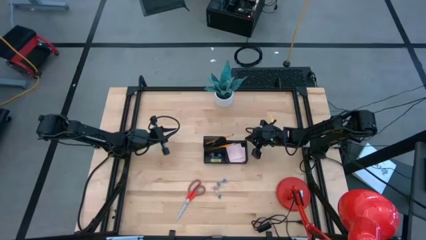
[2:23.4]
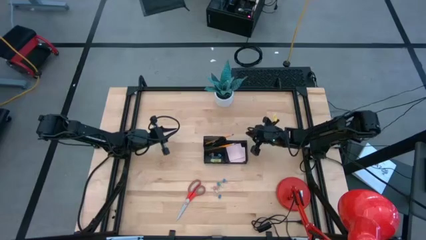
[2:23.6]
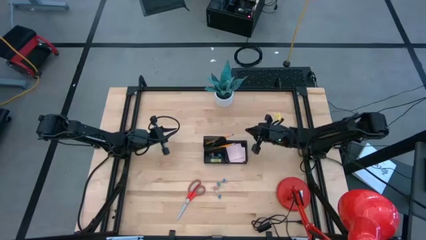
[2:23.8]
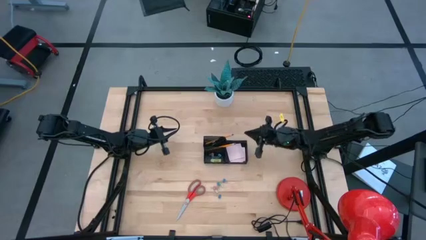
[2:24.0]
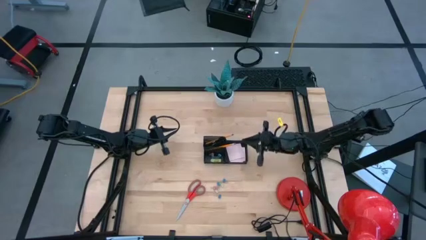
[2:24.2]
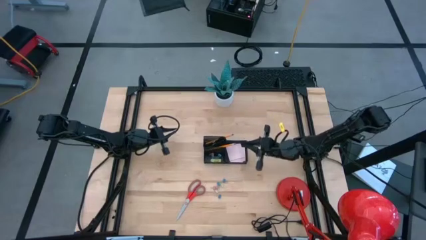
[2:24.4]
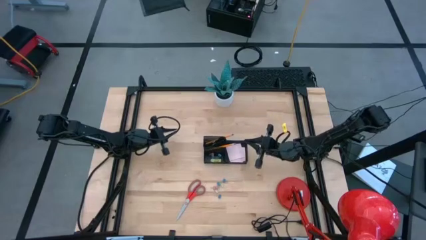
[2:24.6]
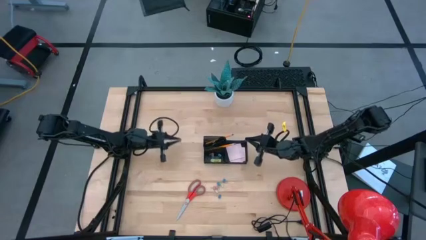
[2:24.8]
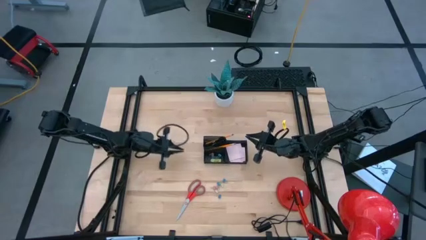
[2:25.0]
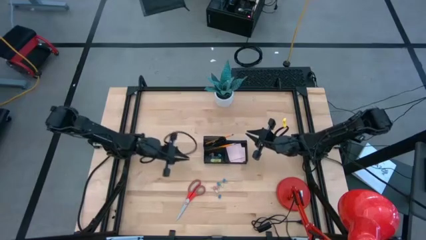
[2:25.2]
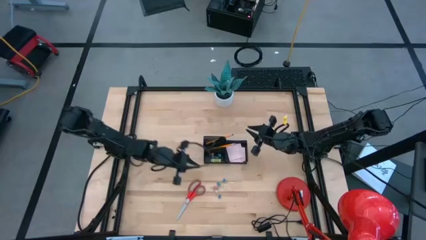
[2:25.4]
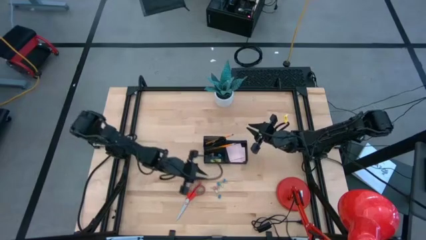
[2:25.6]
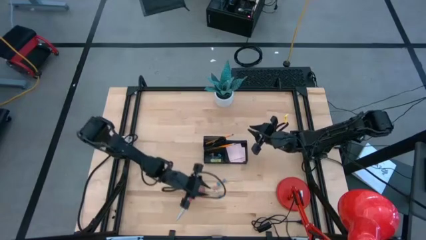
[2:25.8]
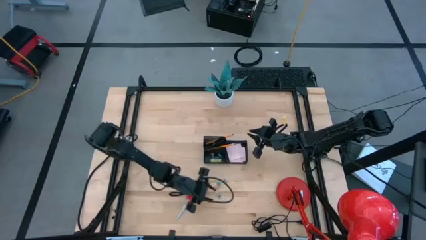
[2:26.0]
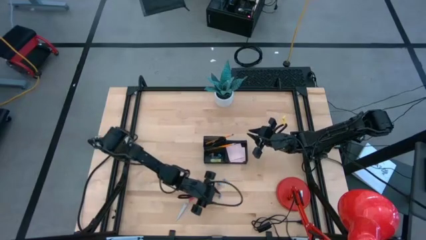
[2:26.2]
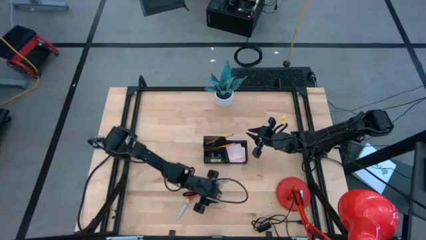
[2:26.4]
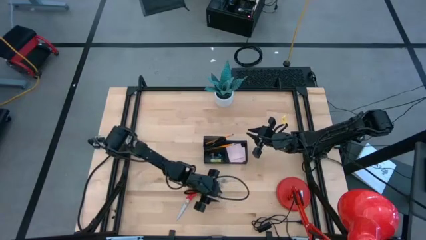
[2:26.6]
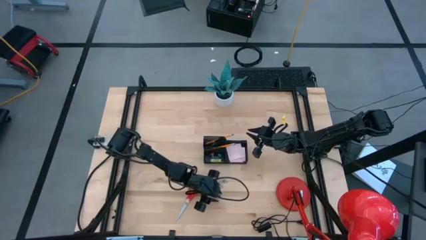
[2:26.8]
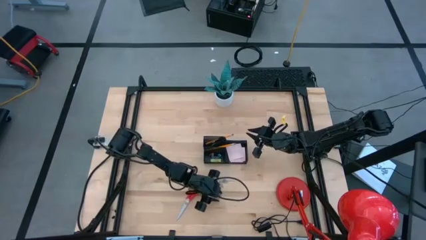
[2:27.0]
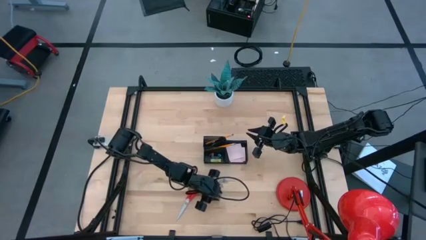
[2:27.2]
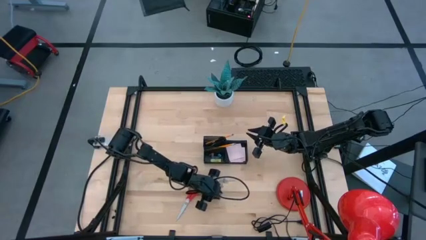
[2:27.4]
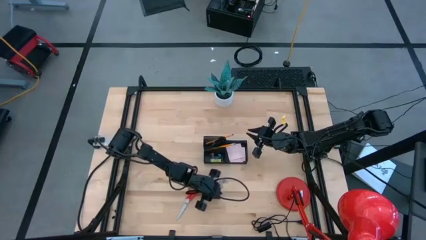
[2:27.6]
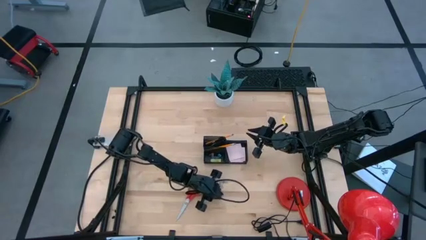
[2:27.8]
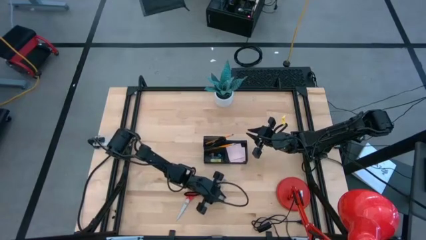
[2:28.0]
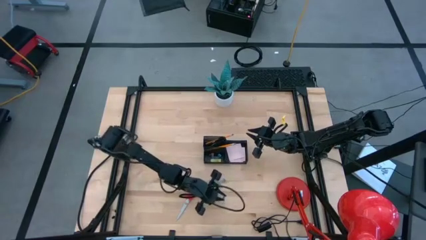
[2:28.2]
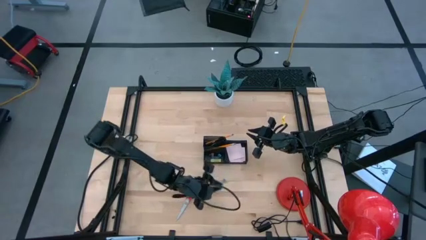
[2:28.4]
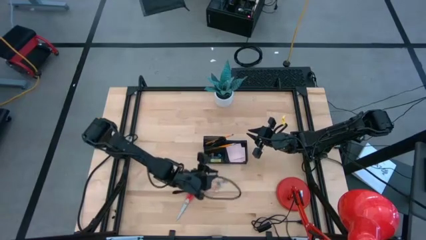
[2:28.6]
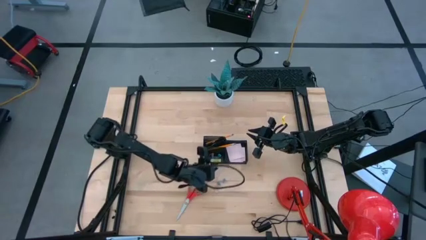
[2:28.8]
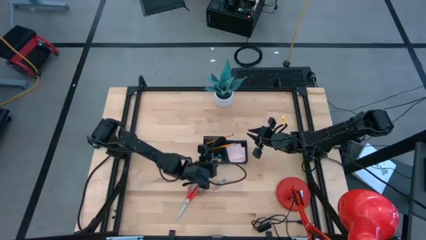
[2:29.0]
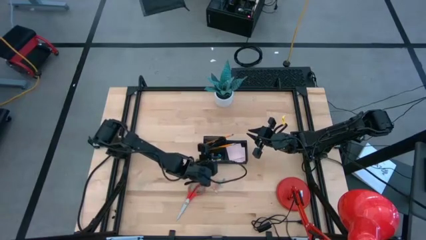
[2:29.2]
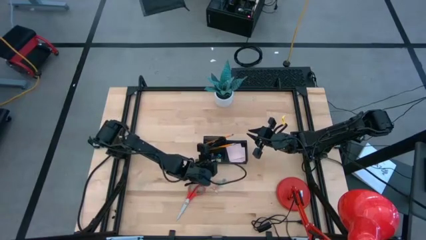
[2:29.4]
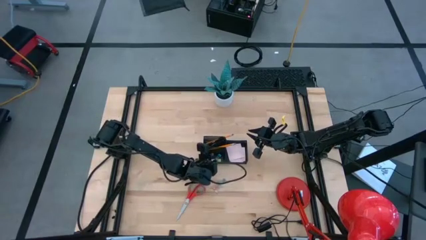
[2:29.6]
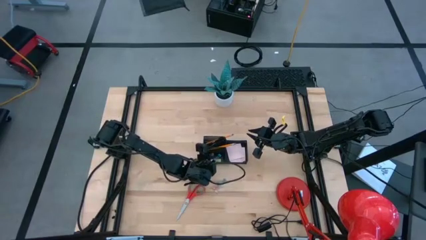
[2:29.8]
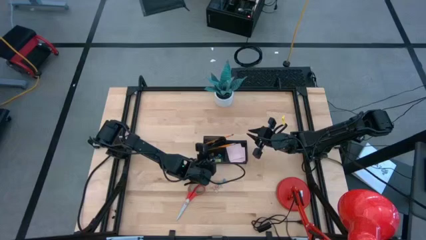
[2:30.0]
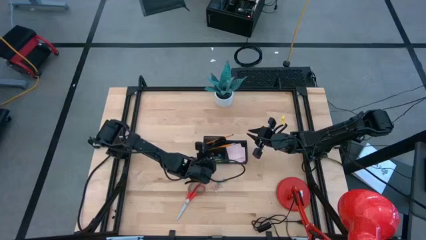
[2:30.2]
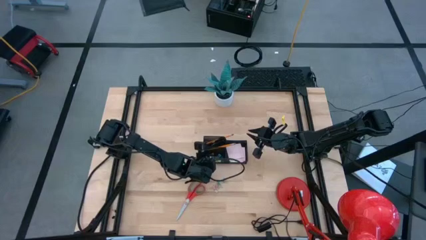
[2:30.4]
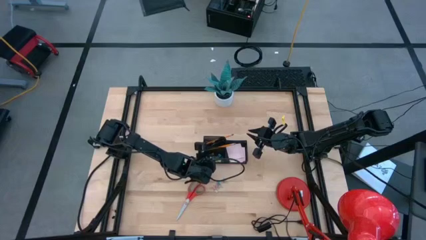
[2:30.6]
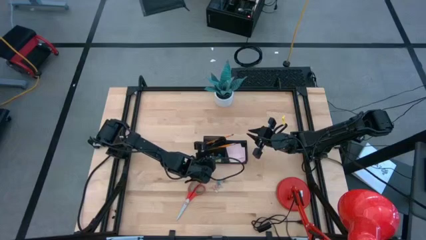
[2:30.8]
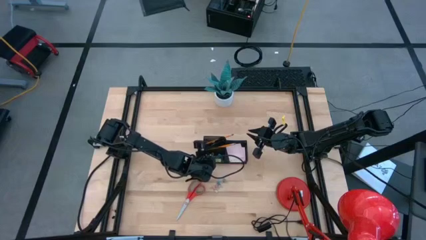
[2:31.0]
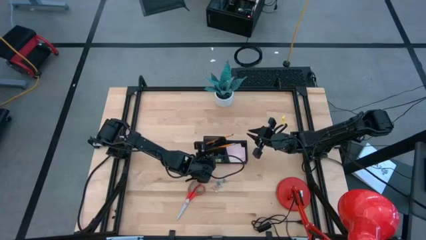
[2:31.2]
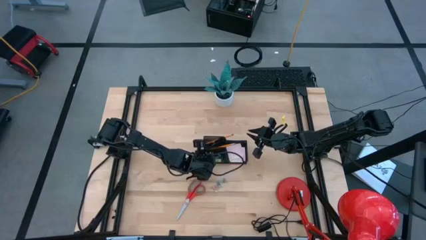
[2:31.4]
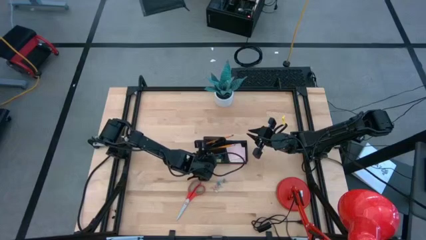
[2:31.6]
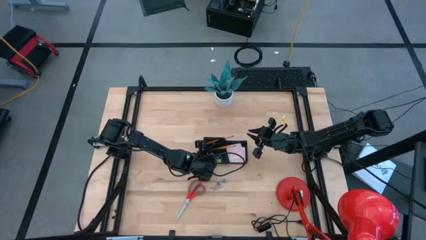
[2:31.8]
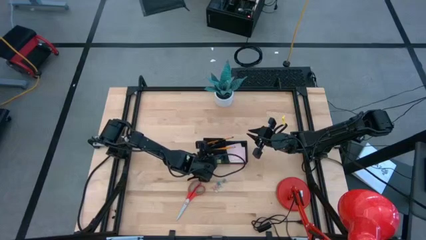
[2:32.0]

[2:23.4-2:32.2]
Task: Pick and place office supplies into organizer
Put the blue binder clip into the desk organizer

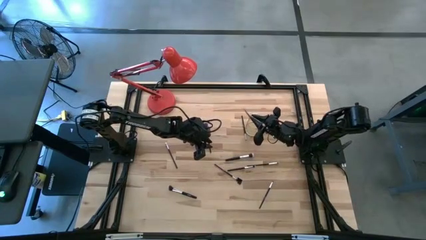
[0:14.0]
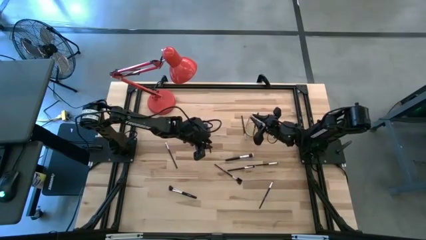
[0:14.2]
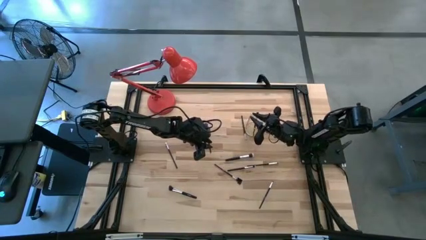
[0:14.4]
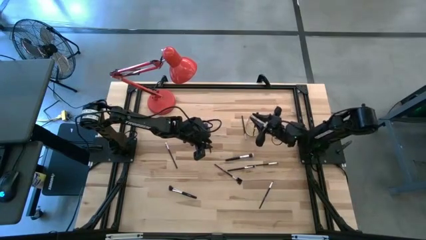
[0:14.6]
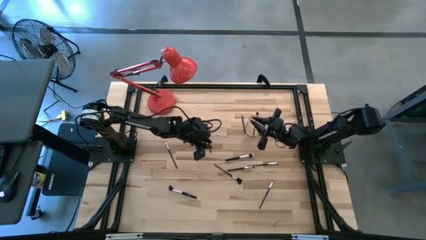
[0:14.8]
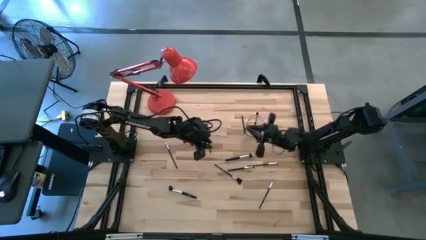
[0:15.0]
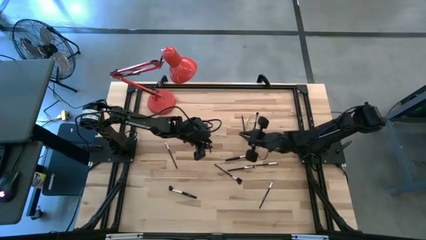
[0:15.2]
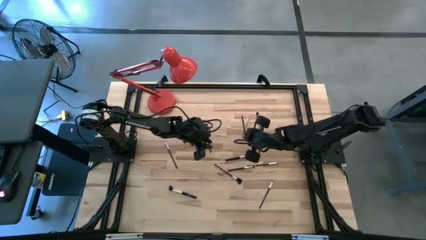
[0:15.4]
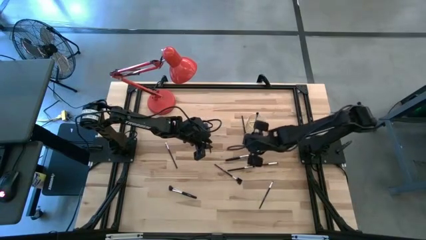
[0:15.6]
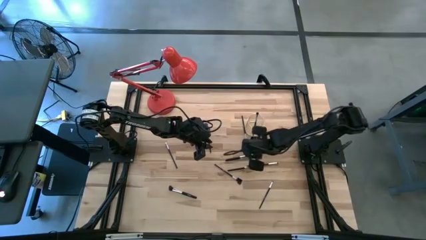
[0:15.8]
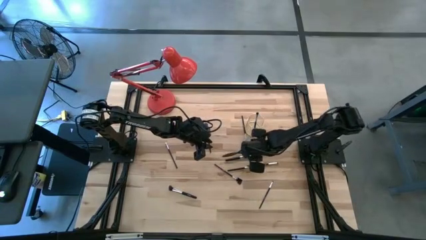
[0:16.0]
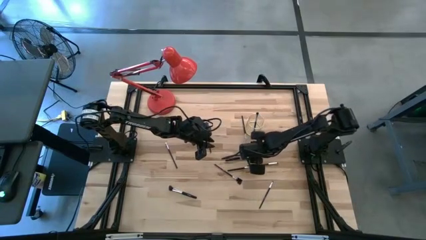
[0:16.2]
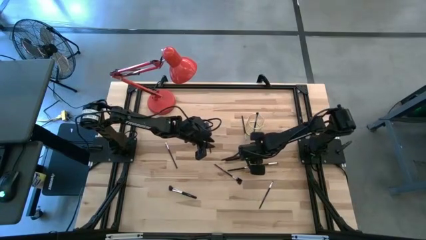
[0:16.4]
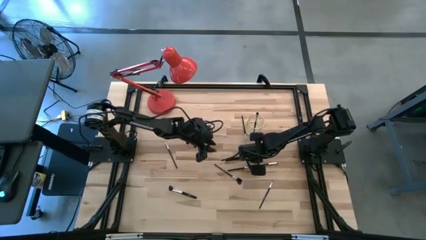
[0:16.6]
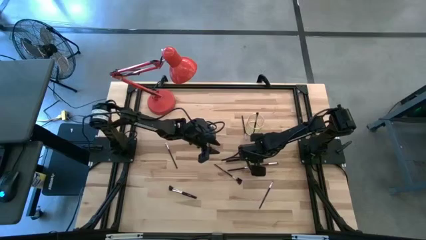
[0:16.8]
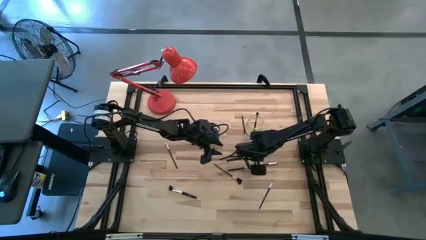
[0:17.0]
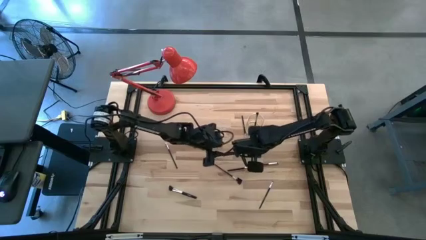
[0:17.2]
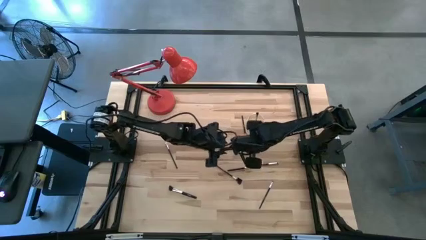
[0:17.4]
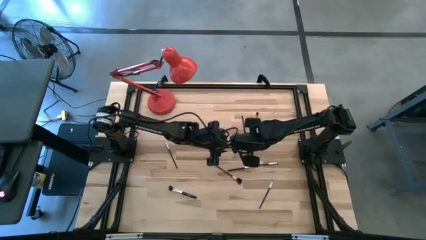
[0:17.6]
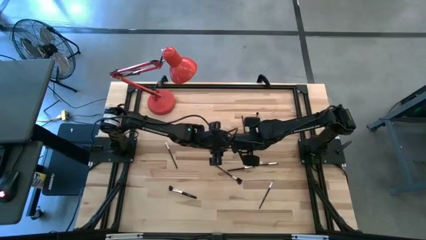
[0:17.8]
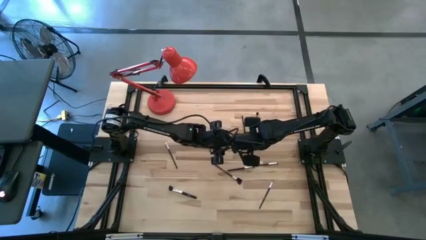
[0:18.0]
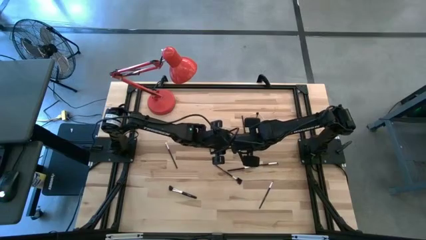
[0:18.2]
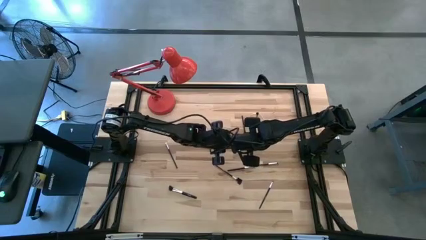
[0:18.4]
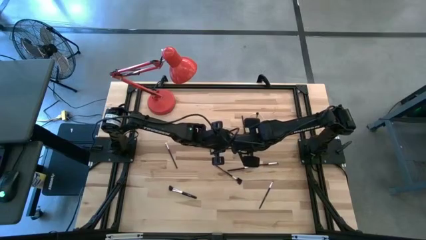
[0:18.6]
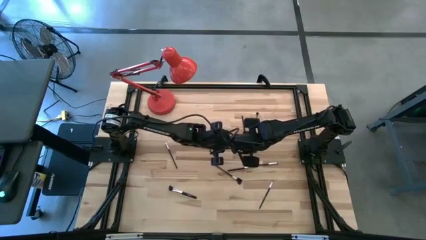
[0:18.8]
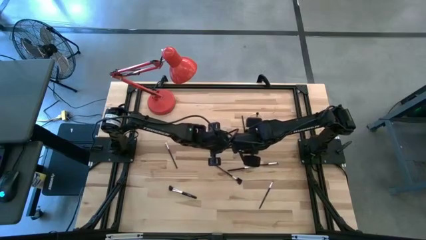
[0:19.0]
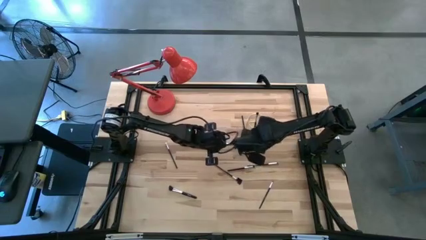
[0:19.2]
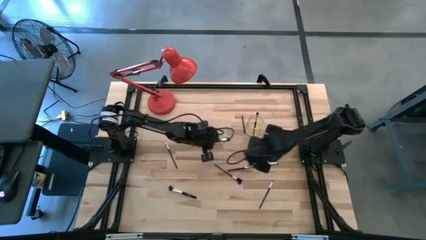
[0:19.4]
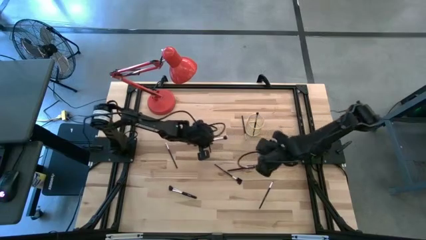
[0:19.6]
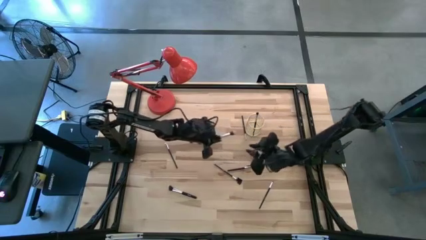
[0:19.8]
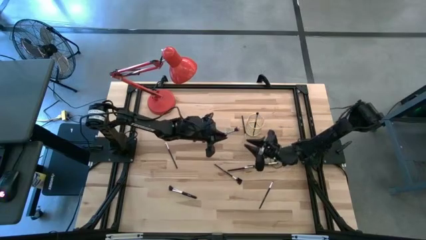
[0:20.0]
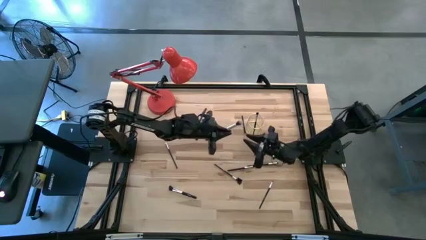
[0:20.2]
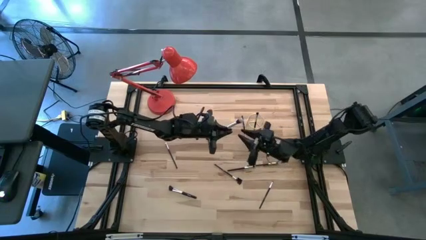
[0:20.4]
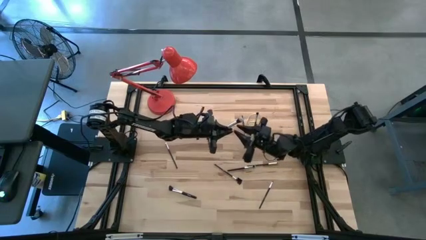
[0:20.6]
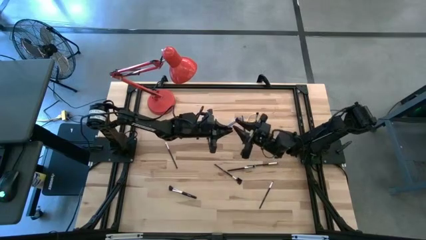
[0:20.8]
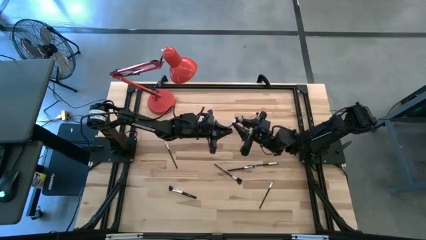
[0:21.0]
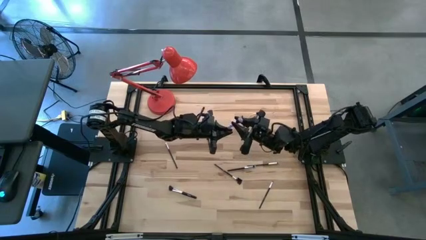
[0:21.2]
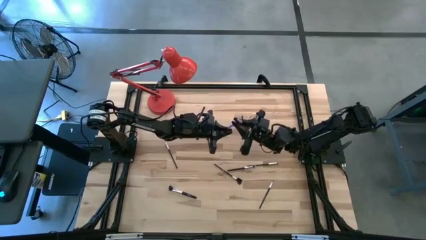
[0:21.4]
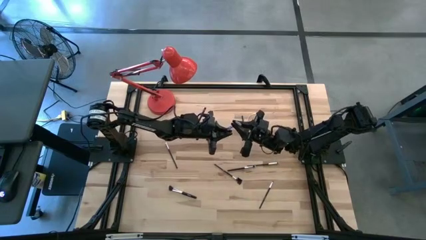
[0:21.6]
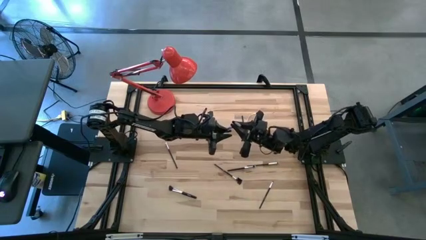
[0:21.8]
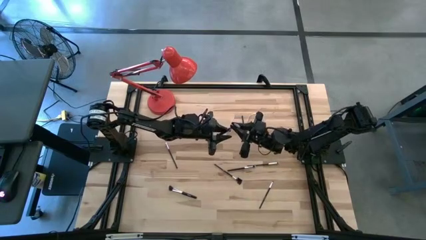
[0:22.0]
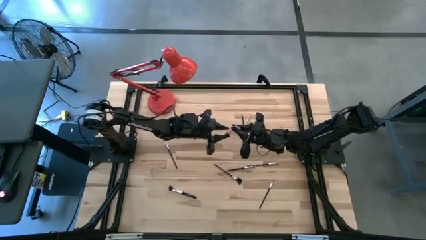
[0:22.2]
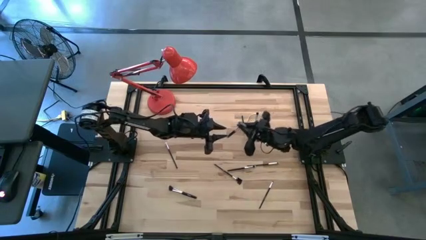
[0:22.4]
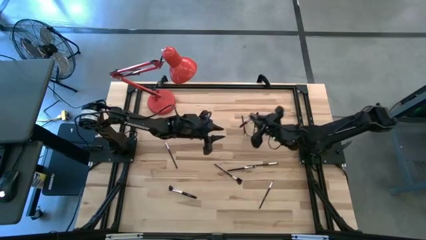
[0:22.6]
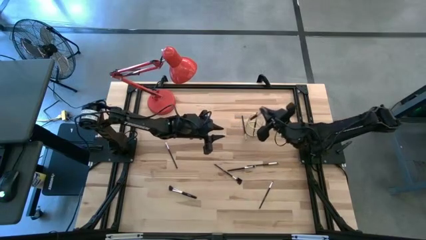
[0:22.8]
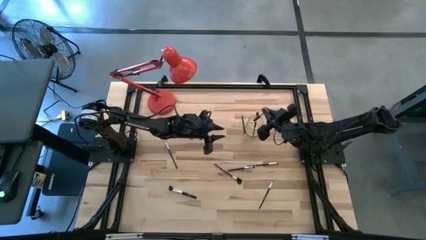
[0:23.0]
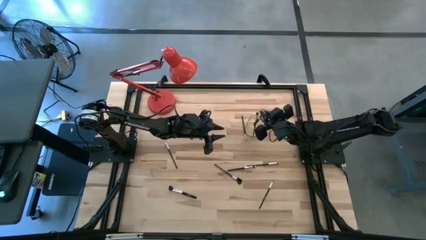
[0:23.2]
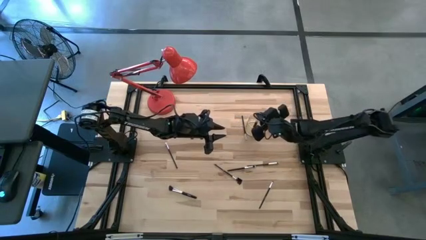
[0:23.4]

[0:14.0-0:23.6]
Task: Put items in baskets/containers
Put the black brush into the gold holder
